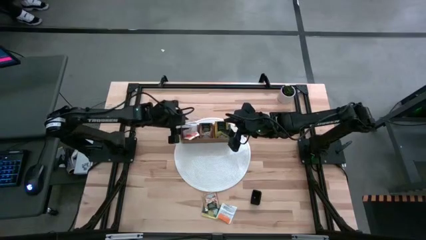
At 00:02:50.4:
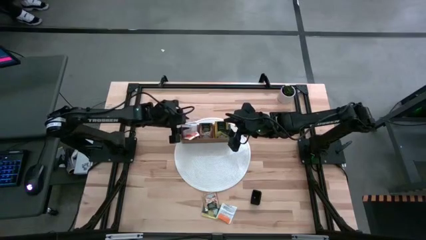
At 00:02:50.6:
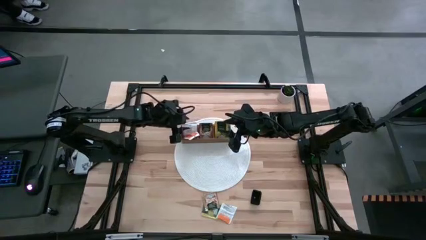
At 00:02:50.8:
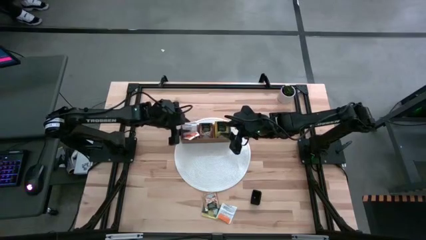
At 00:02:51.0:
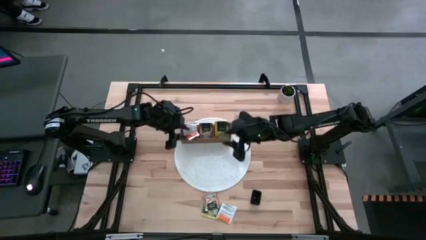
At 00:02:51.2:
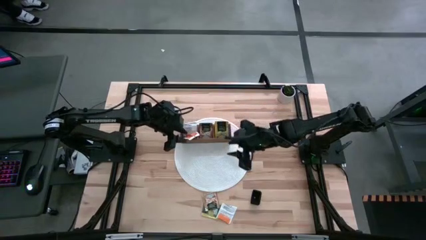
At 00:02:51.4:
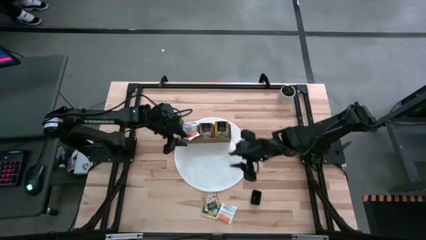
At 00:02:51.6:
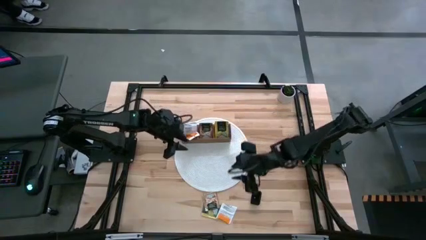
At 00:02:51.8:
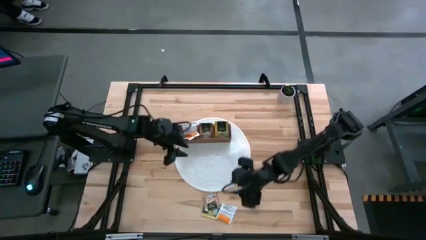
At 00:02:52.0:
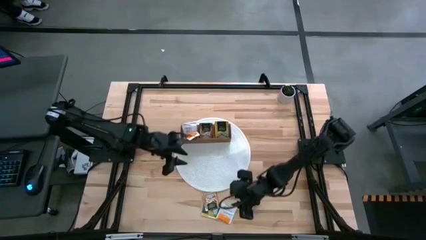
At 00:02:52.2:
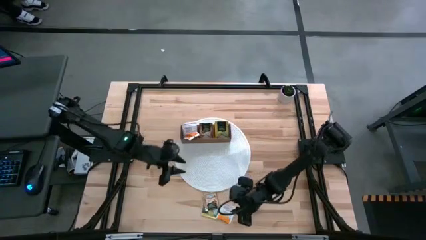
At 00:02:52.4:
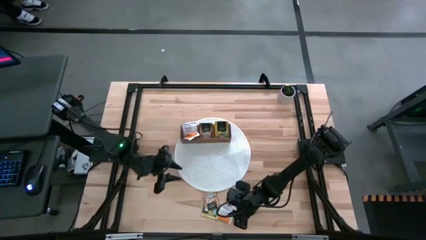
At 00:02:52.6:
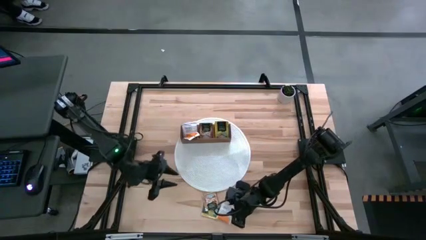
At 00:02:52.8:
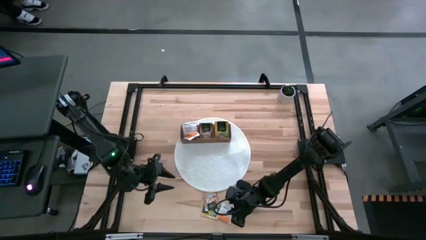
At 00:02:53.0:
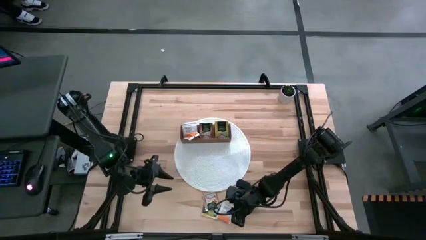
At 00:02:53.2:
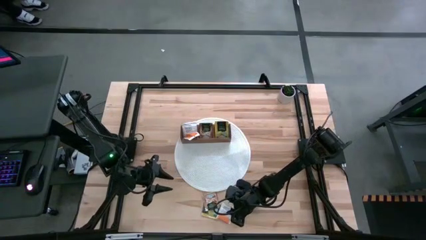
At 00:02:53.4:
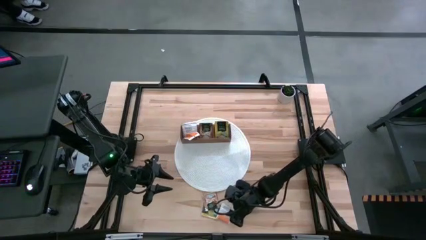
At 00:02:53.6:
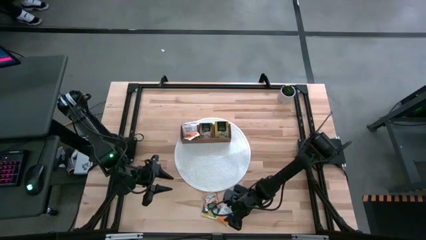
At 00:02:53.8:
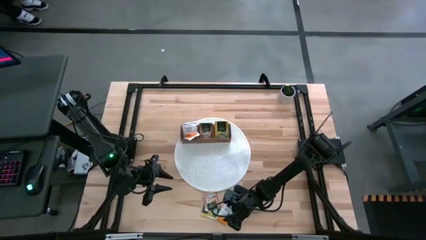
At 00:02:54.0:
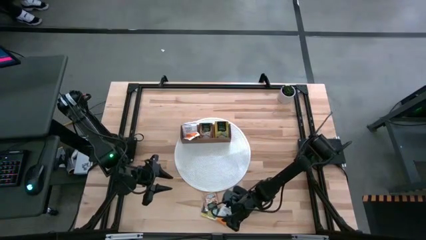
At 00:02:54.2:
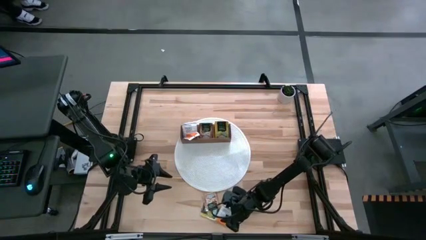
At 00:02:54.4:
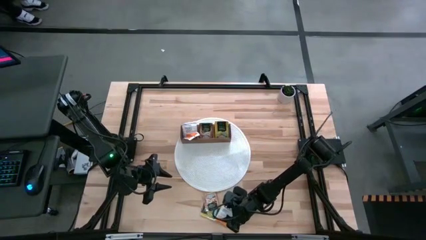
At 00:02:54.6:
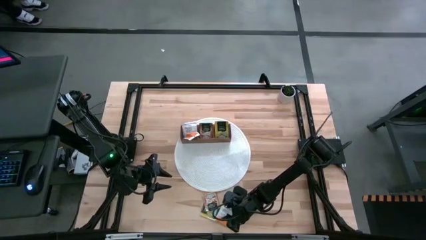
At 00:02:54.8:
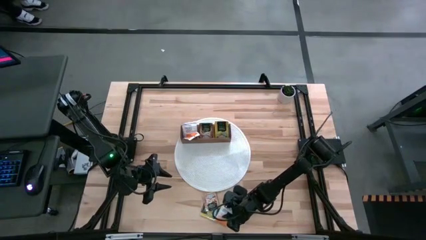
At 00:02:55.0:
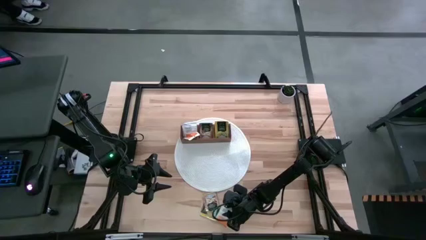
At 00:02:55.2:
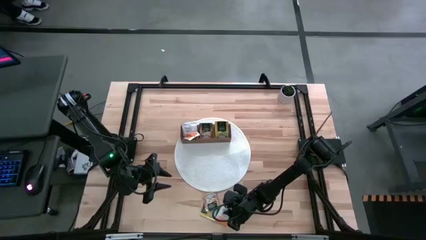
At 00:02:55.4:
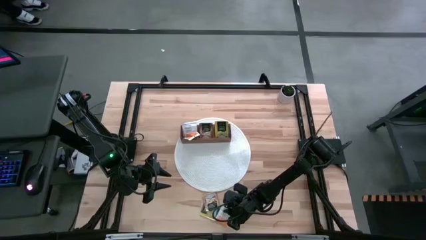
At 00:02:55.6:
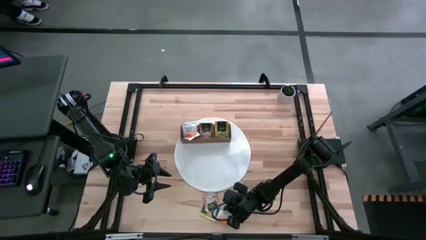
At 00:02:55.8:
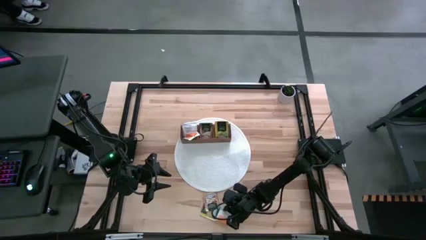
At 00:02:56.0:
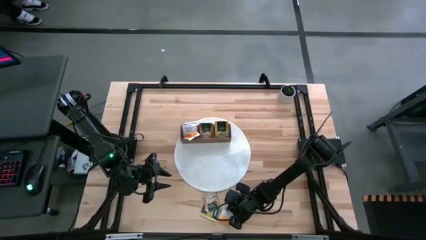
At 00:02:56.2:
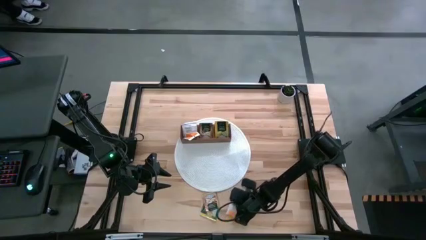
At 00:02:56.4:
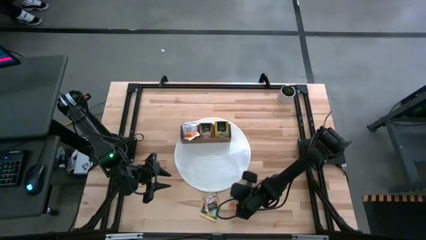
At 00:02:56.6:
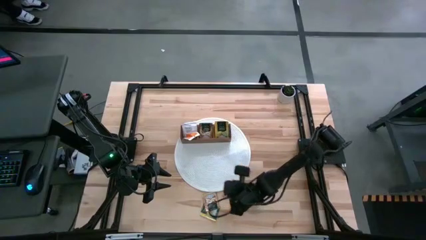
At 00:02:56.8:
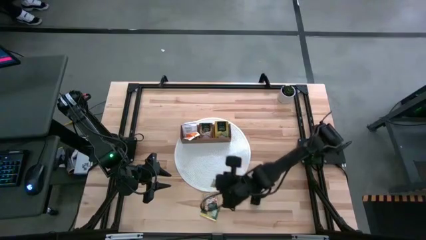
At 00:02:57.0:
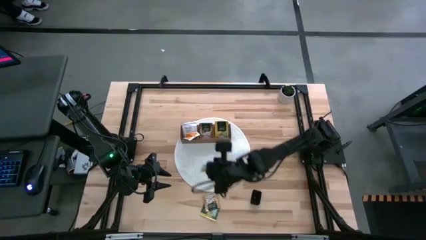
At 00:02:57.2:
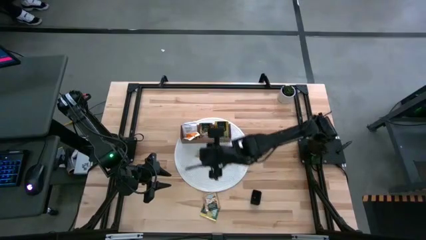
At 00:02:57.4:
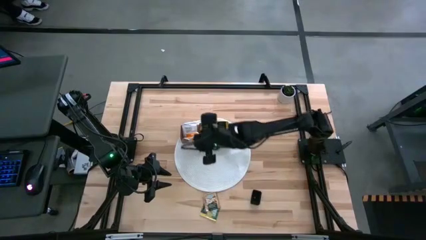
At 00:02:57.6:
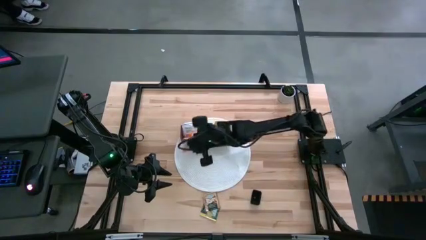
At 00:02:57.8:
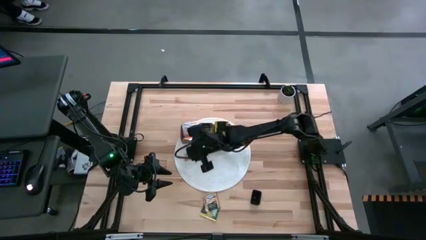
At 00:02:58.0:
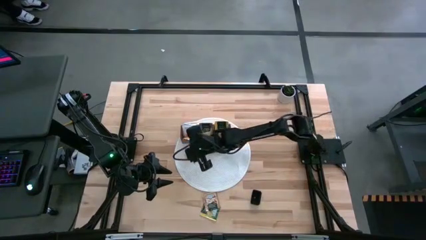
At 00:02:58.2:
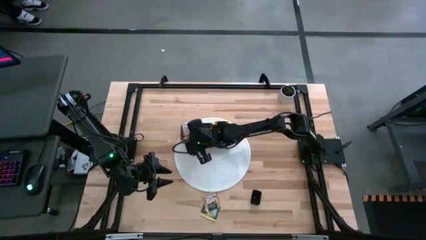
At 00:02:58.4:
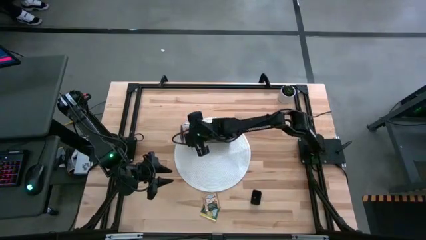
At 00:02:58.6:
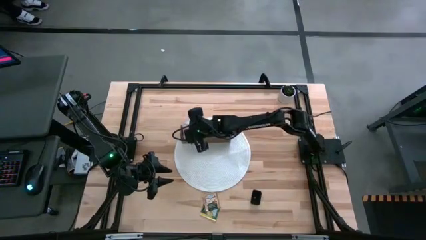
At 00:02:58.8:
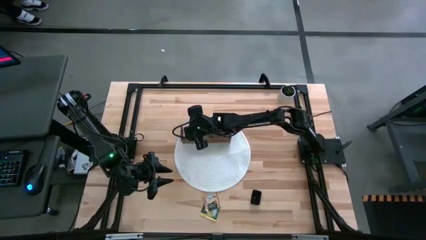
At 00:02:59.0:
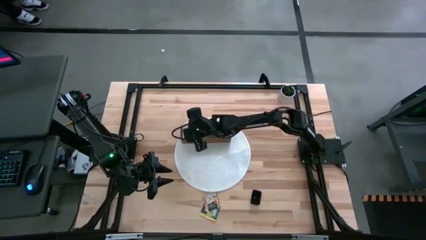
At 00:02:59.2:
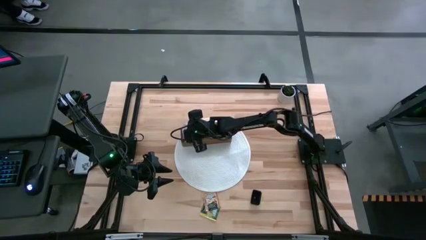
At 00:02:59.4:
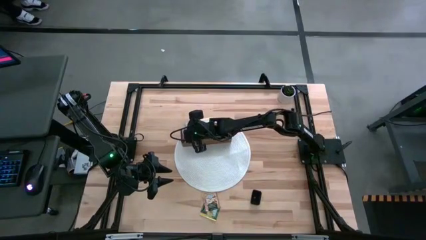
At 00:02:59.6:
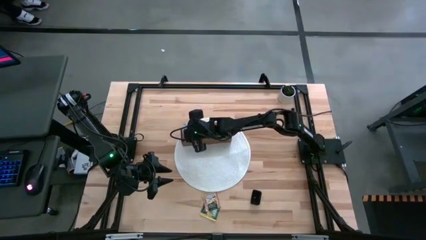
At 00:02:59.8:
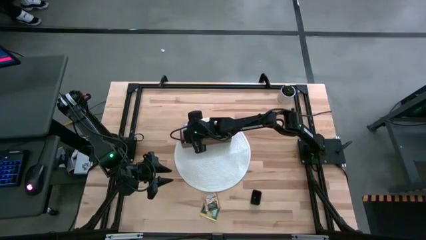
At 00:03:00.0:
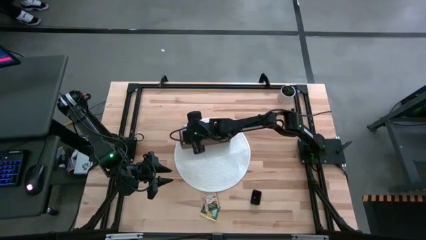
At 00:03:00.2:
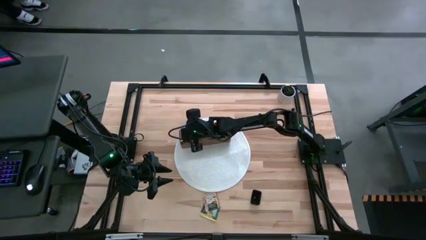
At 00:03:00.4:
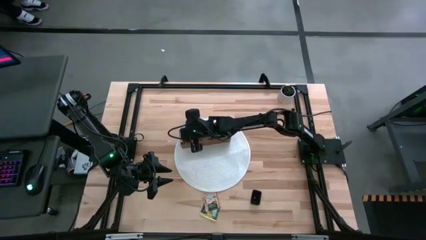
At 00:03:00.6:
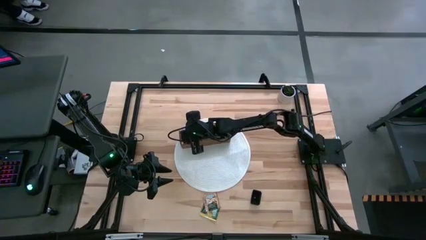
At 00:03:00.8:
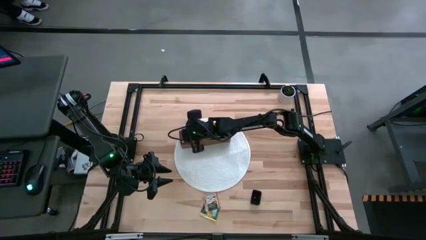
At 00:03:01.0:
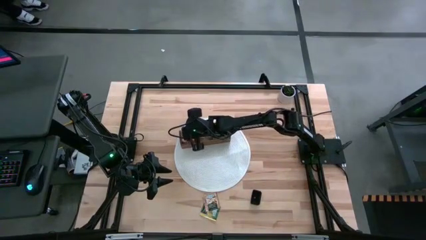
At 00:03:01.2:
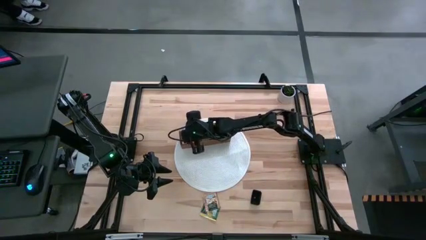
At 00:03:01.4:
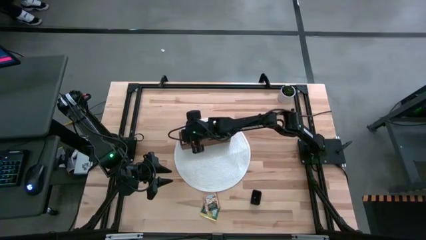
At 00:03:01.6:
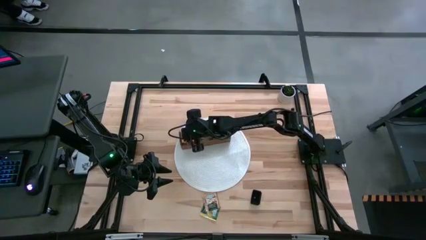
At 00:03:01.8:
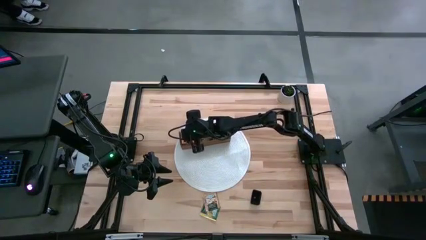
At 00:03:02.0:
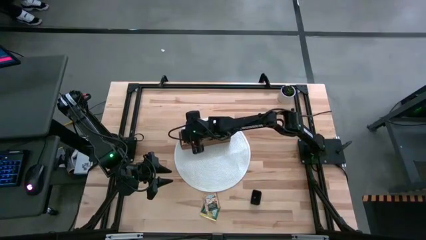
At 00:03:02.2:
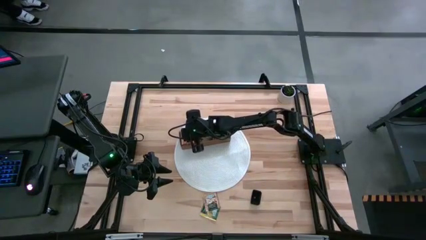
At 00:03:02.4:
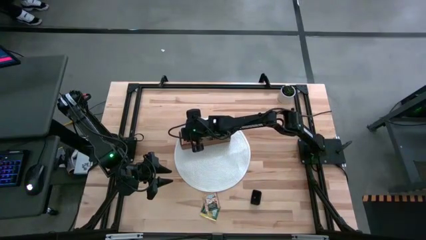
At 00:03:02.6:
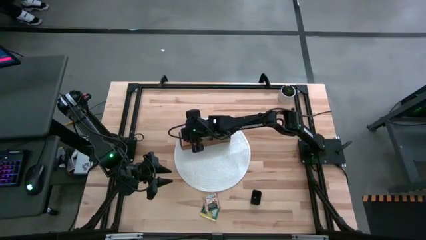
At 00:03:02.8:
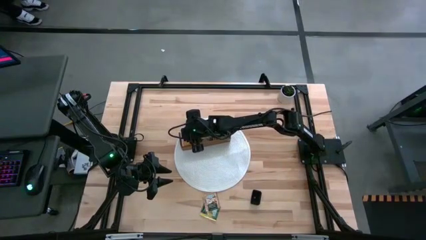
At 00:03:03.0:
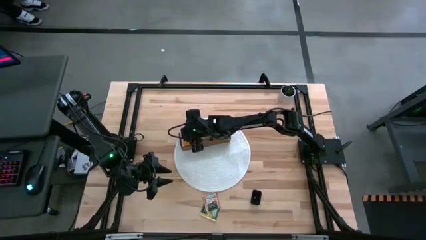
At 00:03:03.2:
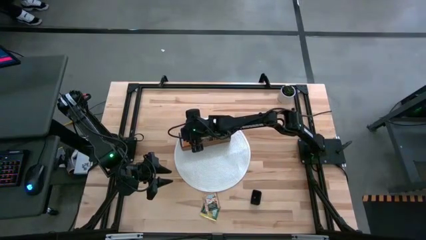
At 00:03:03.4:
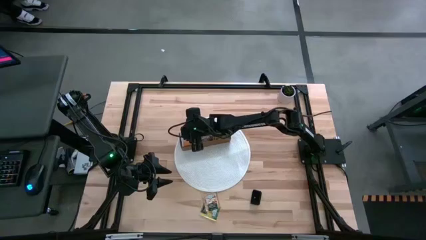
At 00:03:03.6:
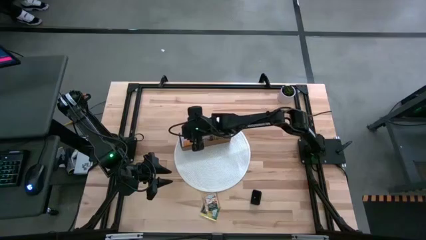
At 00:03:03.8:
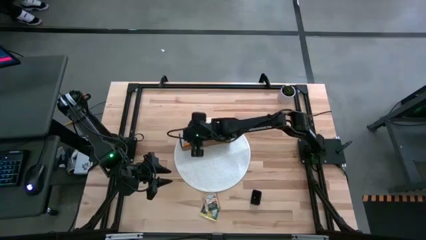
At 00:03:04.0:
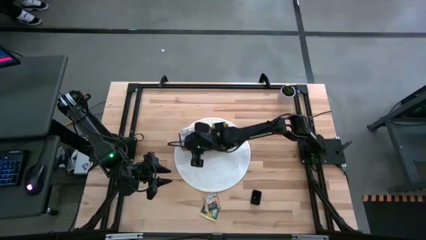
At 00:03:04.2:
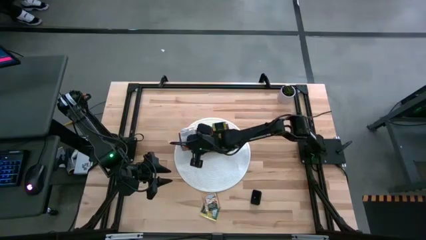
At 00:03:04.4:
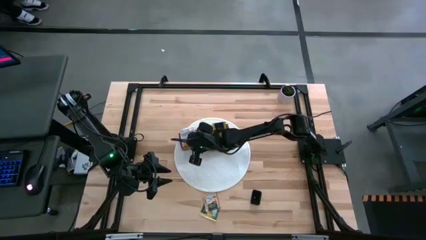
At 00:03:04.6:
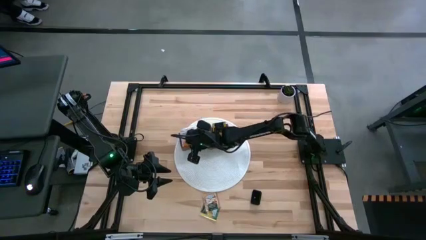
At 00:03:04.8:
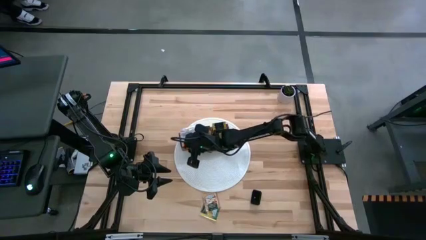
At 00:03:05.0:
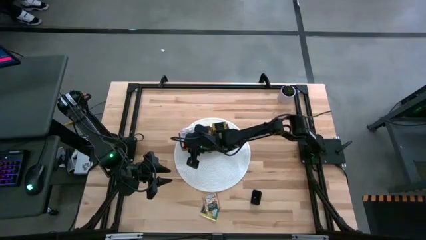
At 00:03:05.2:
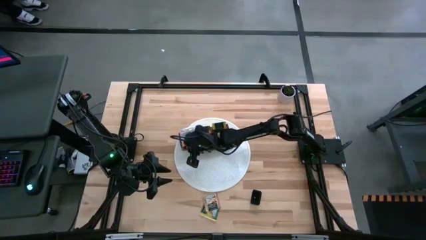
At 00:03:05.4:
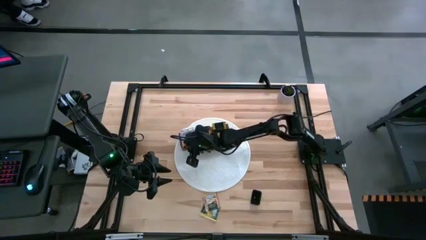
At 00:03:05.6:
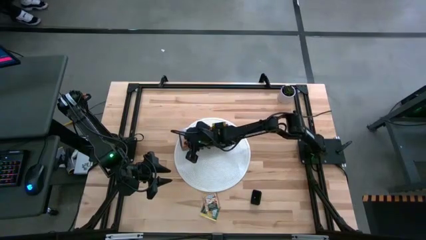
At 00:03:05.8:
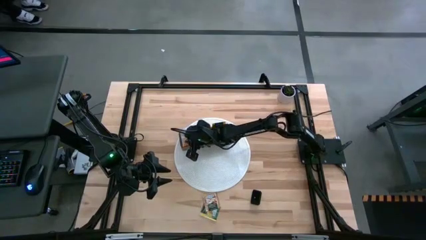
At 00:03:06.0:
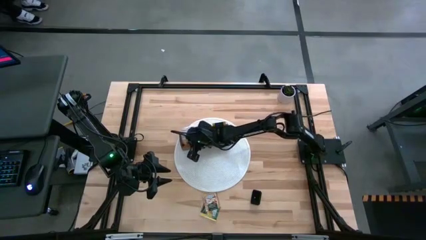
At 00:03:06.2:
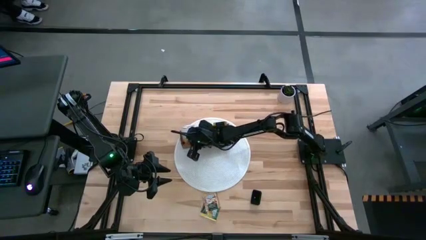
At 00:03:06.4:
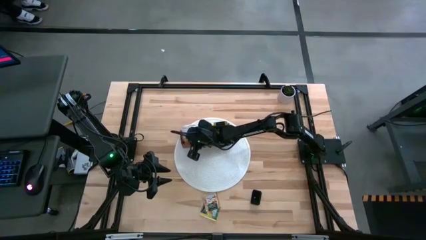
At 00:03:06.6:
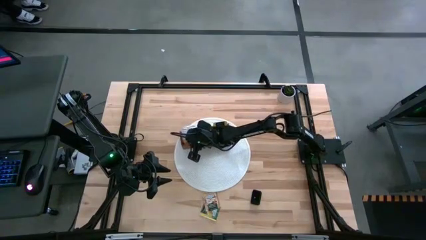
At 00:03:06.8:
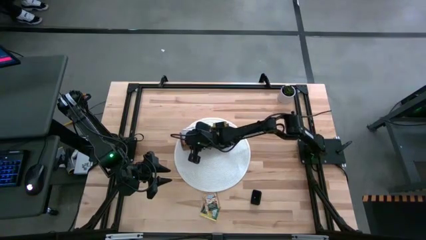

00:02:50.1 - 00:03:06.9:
Task: Pick & Place Tea
Put the orange tea bag into the left section of the wooden organizer
